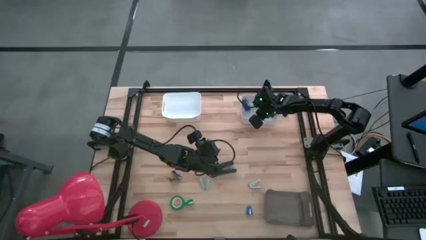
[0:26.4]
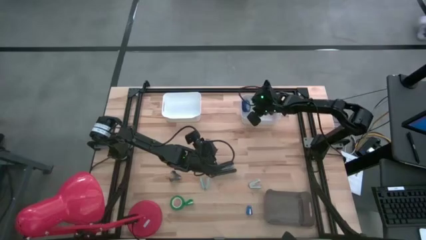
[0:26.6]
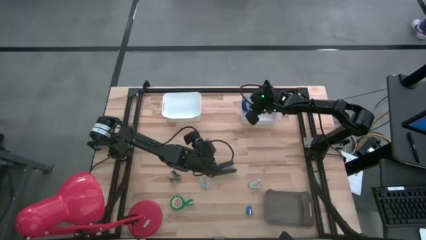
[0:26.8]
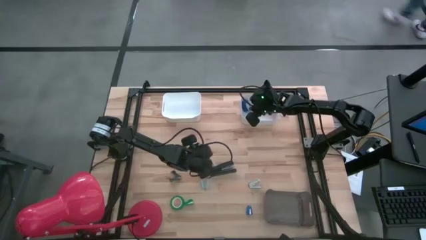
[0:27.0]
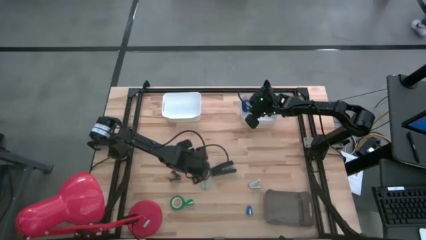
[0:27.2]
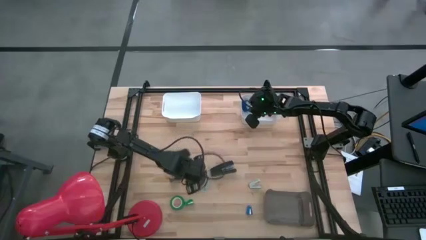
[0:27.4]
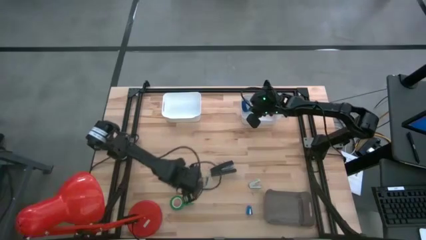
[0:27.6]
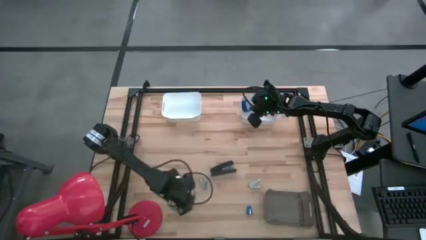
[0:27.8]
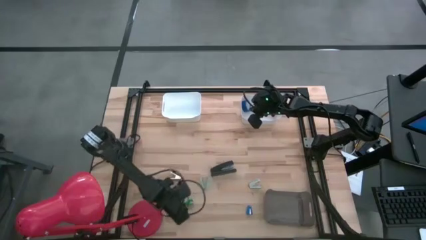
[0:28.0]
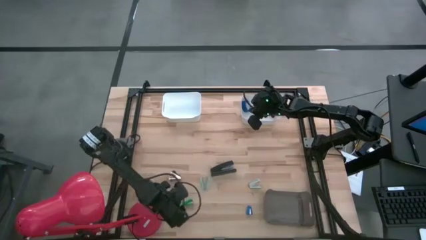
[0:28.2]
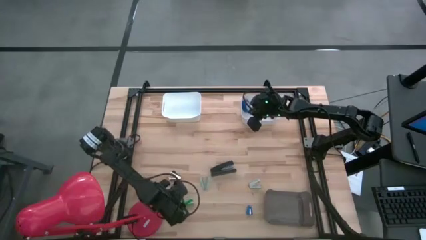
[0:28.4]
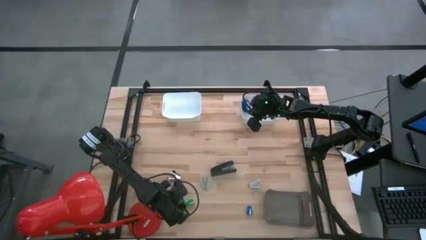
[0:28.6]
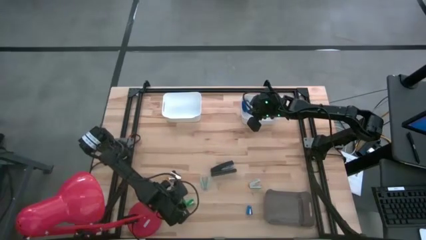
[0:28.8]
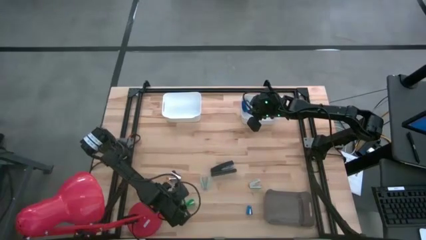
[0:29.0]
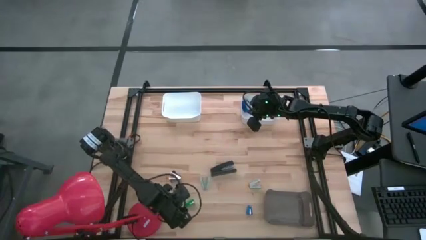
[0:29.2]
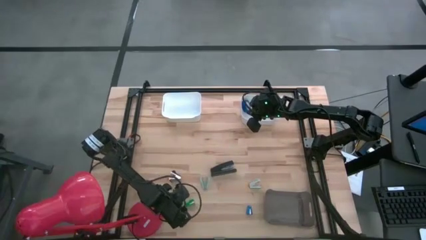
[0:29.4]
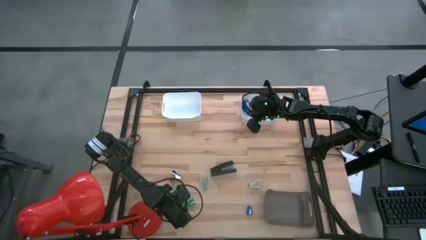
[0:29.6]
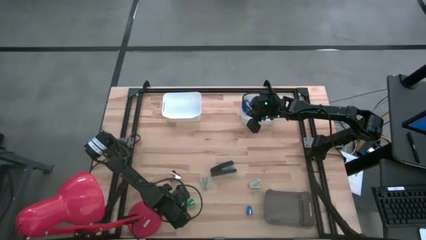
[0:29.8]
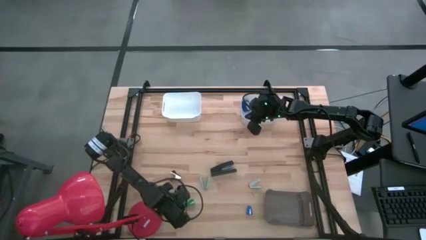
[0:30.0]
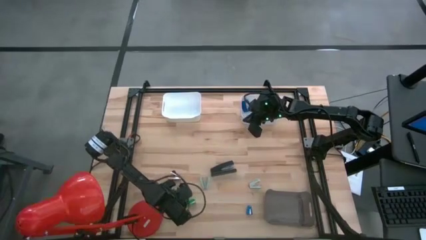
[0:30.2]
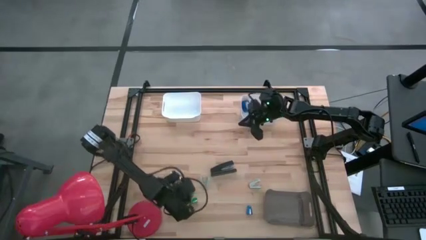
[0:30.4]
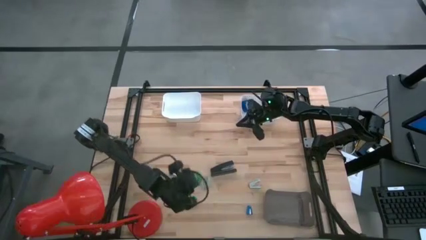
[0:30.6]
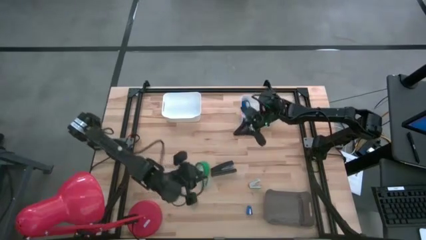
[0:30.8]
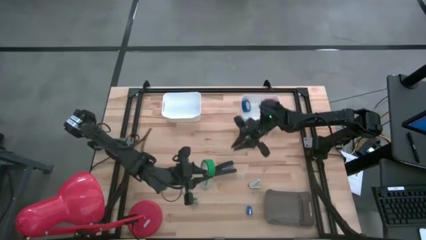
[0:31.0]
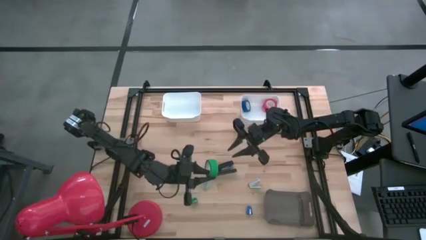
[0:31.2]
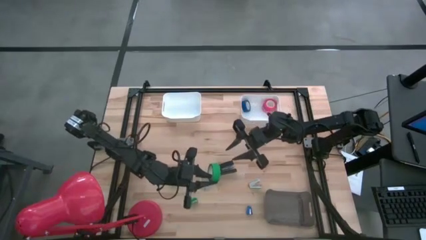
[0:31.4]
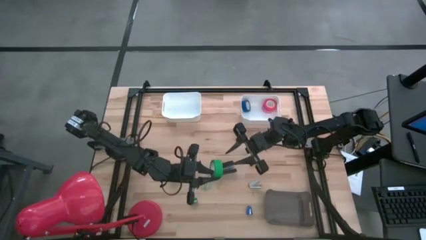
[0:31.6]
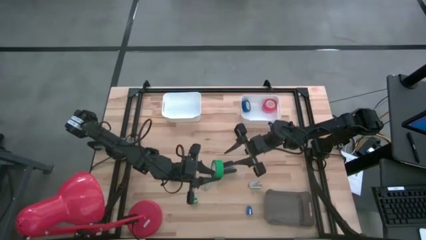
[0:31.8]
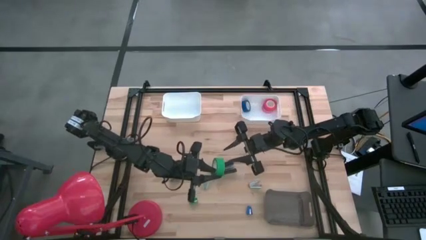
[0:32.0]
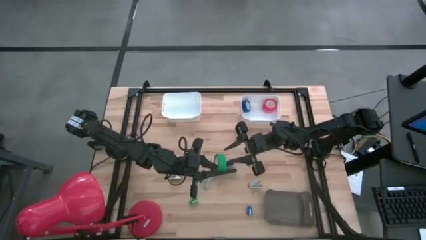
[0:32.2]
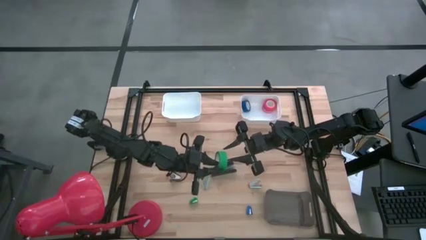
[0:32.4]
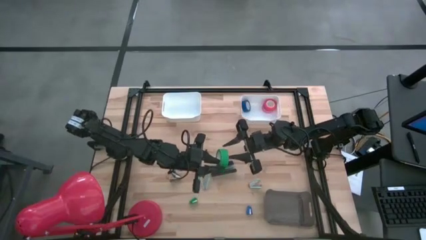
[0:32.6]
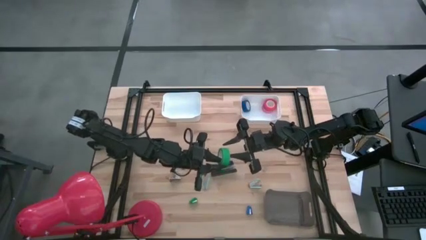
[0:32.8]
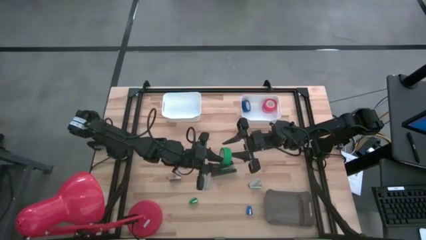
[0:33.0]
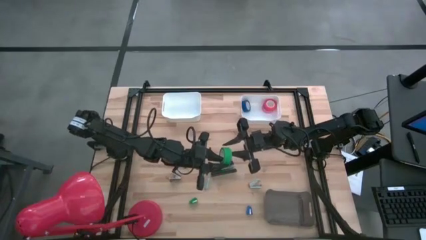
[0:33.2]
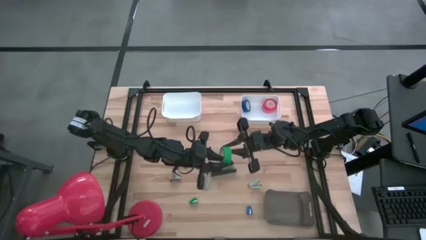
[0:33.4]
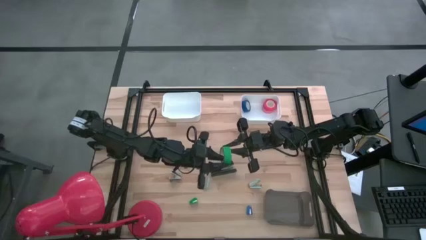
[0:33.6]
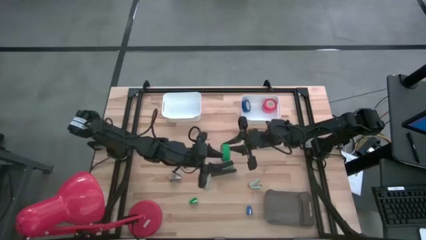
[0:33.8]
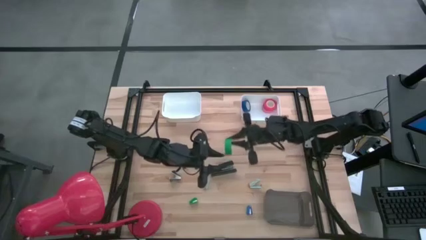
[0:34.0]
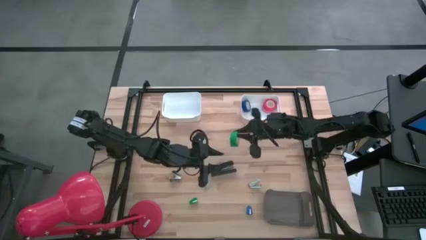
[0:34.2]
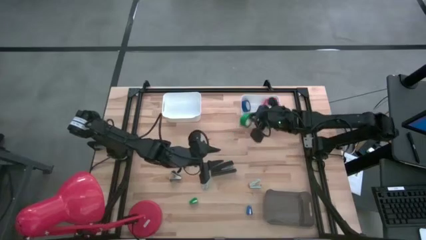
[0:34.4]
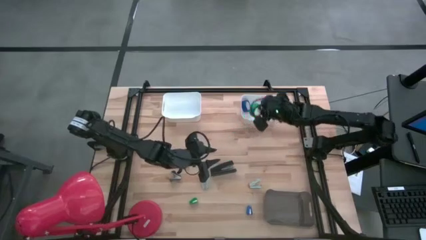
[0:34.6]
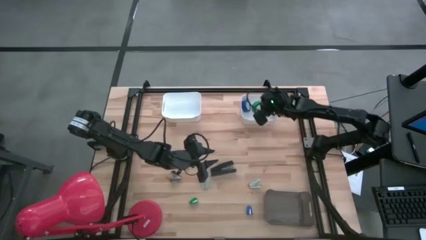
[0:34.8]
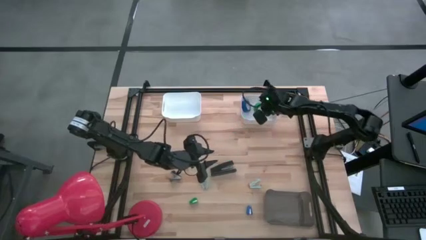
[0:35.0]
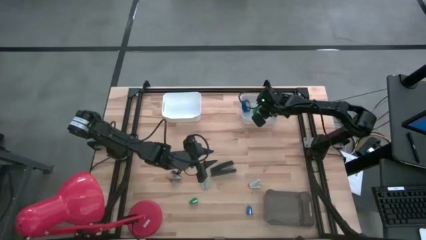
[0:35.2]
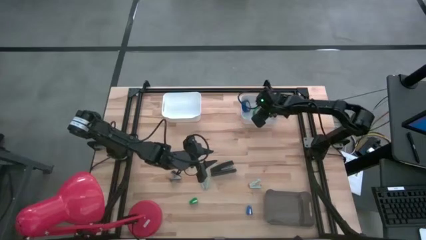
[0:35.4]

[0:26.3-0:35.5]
Task: Pick and place Stapler, Stapler remover, tape
Put the green tape into the right white bin

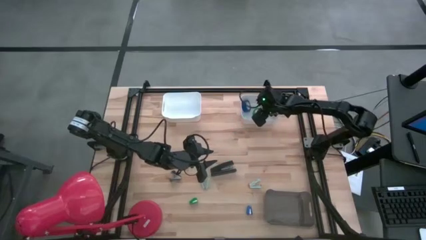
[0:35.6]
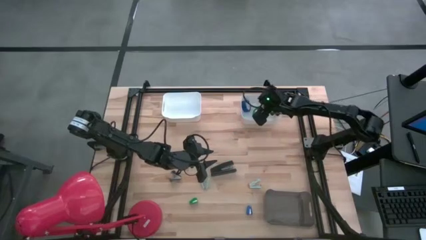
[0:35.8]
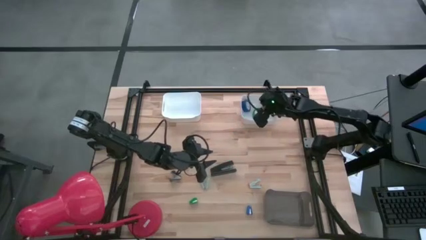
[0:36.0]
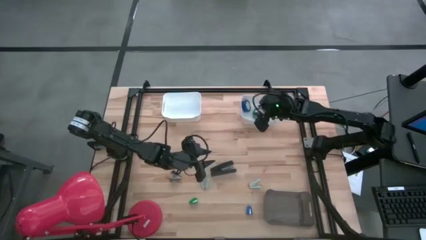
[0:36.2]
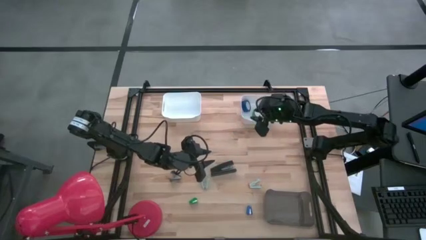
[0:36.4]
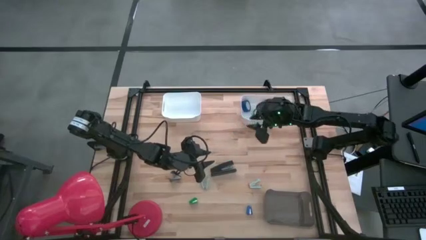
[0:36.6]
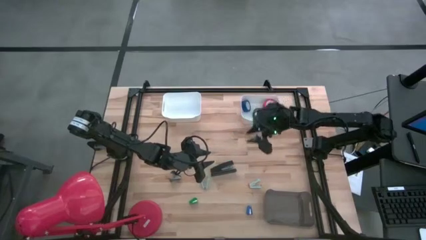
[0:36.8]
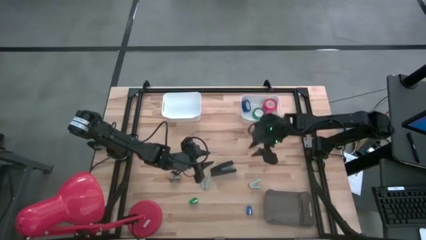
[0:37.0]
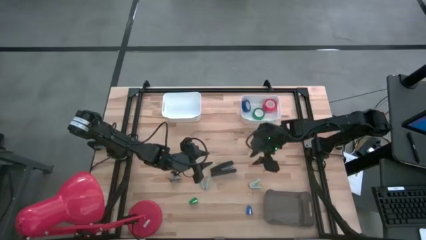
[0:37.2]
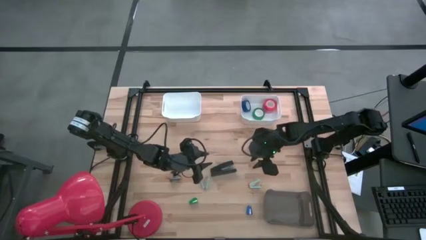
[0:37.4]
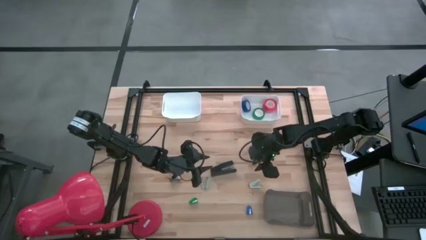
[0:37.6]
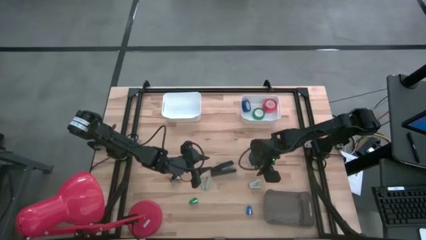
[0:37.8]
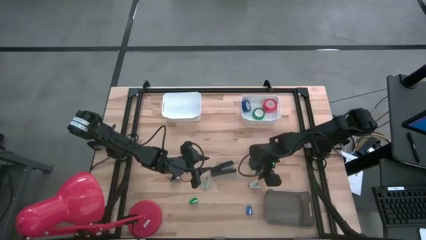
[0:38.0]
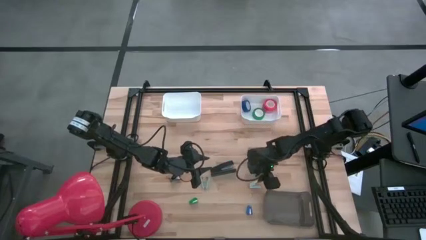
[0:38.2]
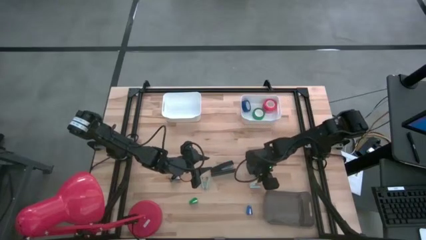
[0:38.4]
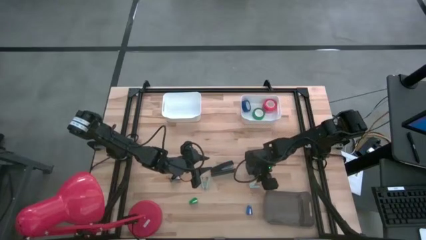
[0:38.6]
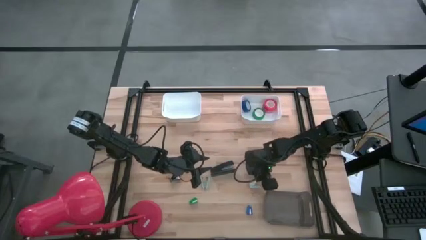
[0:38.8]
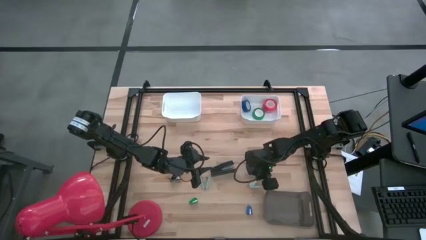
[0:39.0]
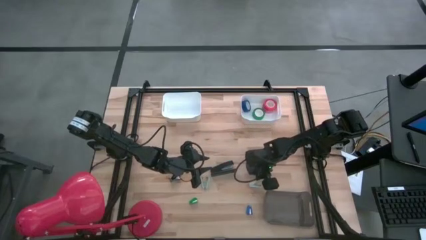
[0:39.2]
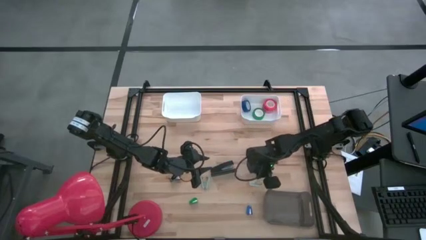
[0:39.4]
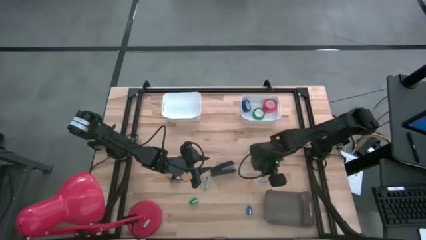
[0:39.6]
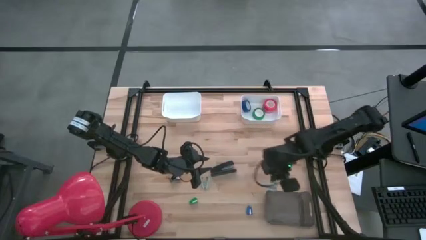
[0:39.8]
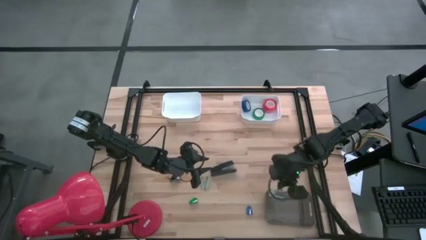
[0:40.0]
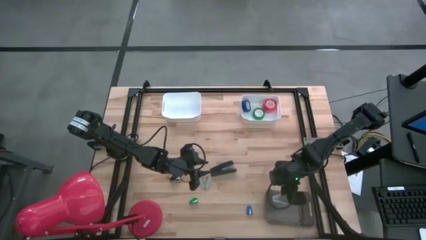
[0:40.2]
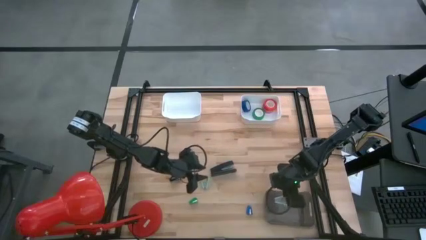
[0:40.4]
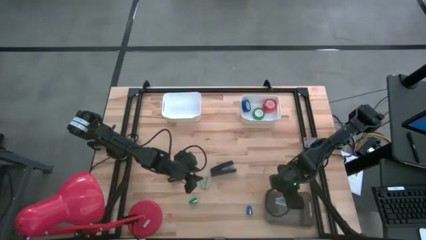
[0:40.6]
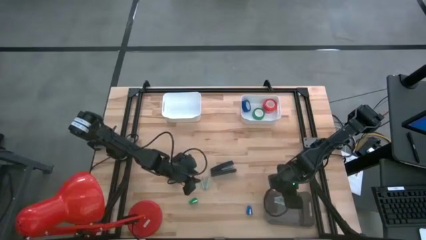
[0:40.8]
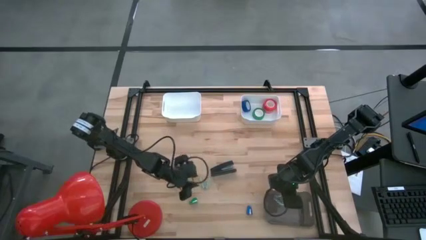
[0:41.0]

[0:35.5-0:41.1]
Put the light blue staple remover into the gray bin

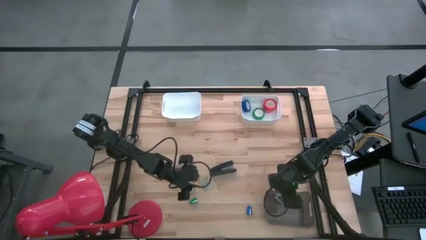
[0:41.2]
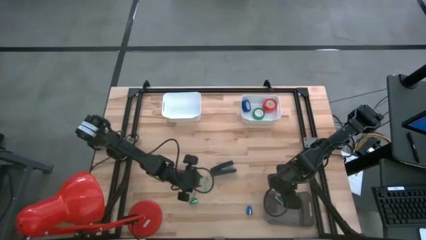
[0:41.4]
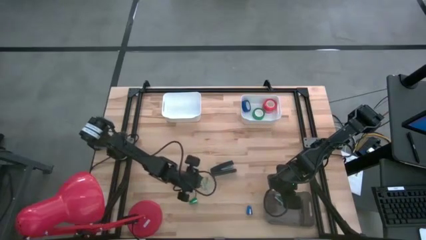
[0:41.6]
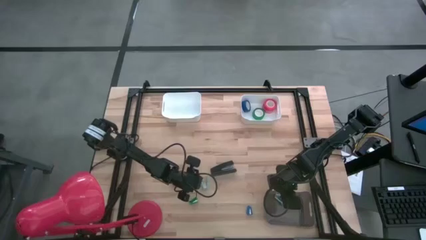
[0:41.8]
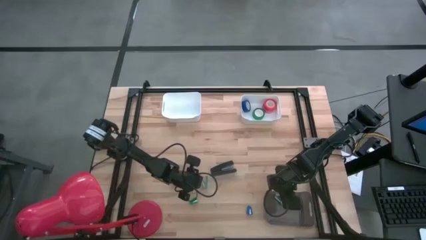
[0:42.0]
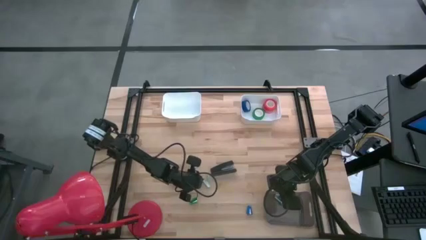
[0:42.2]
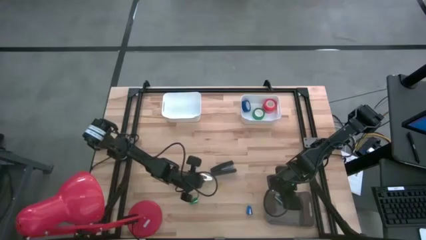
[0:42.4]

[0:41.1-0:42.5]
Put the light blue staple remover into the gray bin

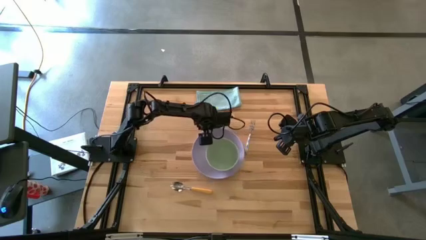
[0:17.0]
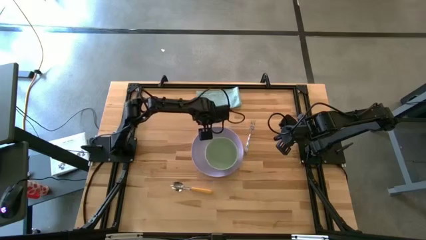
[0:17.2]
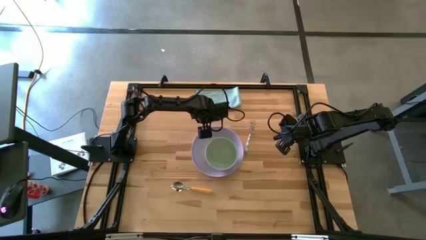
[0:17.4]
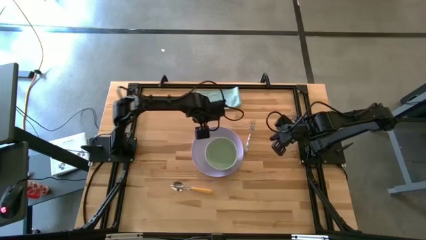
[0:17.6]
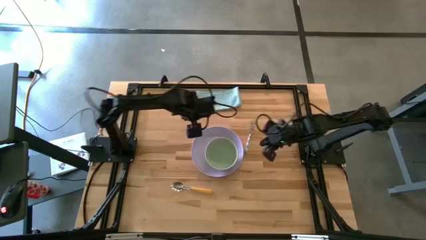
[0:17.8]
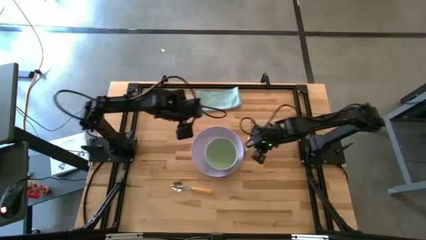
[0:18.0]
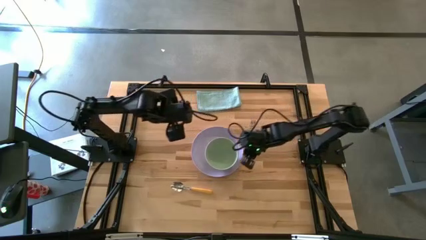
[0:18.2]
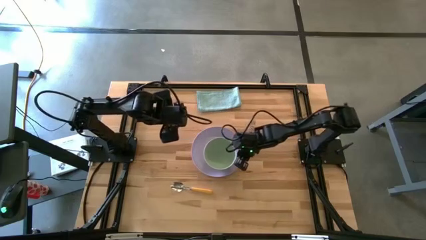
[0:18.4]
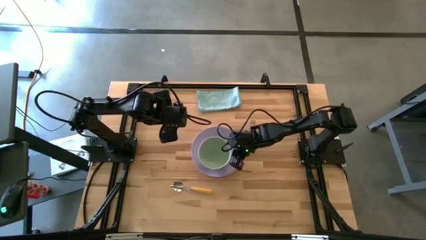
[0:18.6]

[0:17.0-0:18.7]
Task: Set table place
Adjust the green bowl
